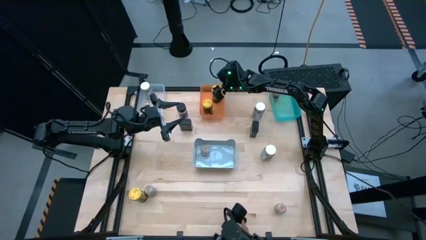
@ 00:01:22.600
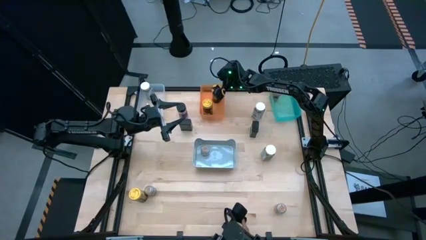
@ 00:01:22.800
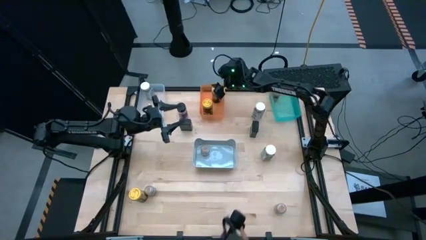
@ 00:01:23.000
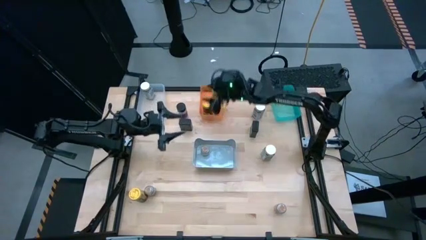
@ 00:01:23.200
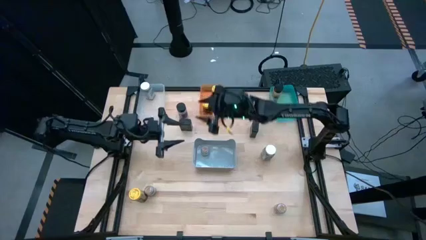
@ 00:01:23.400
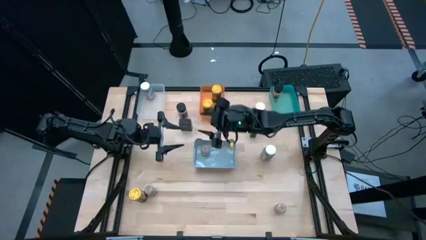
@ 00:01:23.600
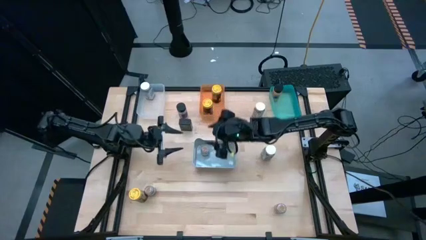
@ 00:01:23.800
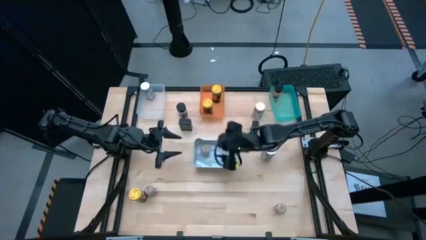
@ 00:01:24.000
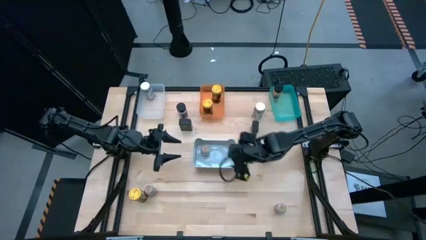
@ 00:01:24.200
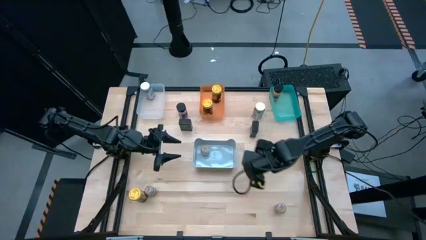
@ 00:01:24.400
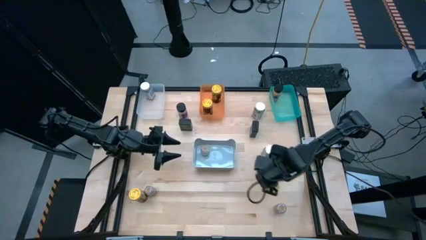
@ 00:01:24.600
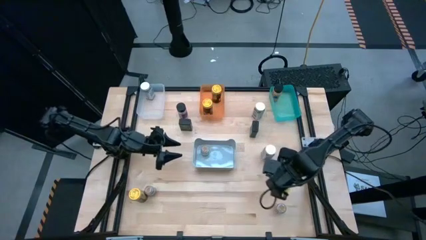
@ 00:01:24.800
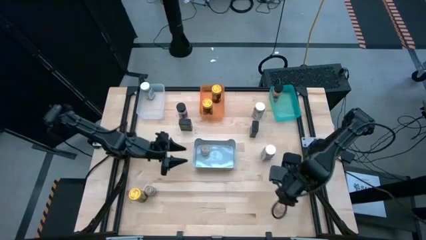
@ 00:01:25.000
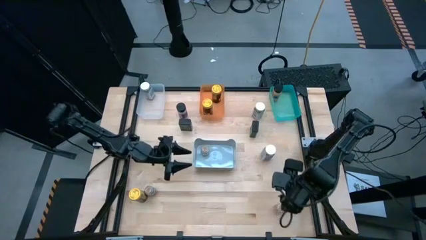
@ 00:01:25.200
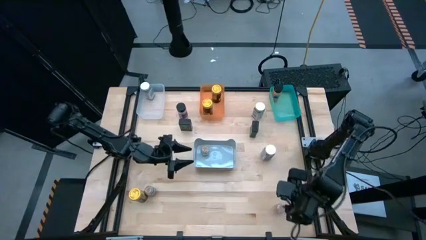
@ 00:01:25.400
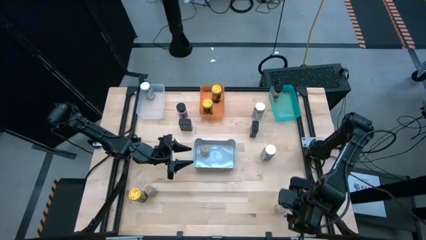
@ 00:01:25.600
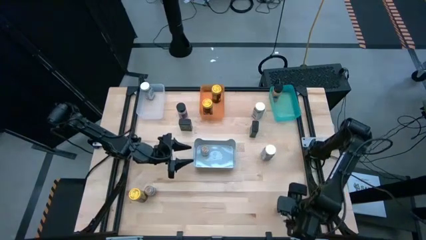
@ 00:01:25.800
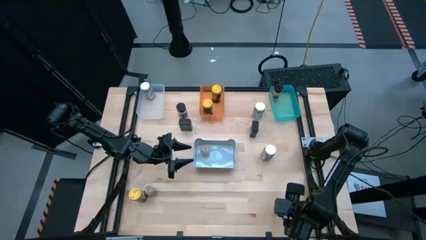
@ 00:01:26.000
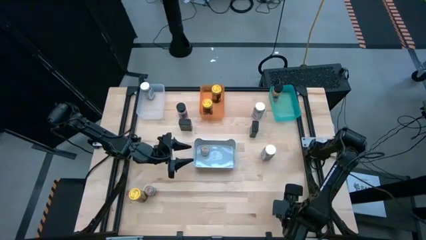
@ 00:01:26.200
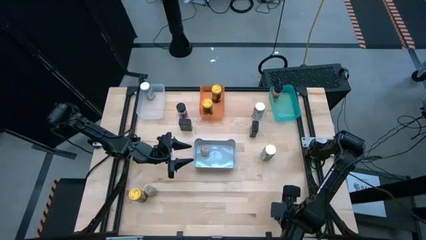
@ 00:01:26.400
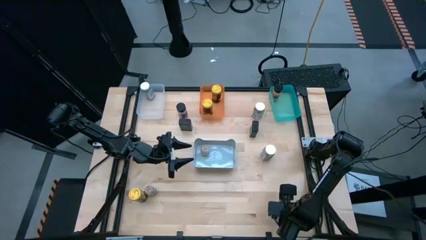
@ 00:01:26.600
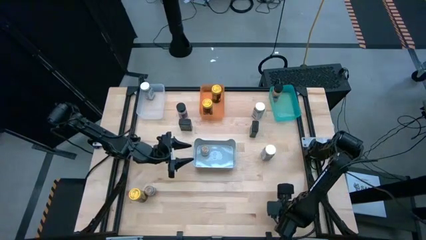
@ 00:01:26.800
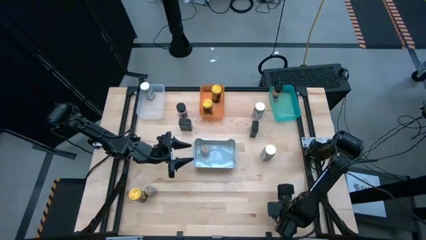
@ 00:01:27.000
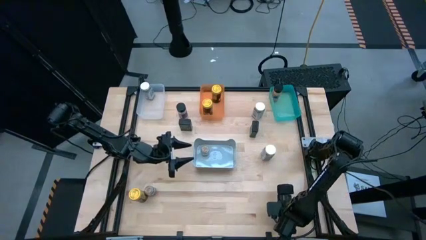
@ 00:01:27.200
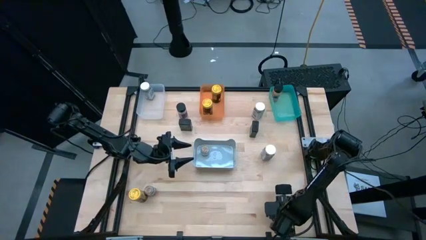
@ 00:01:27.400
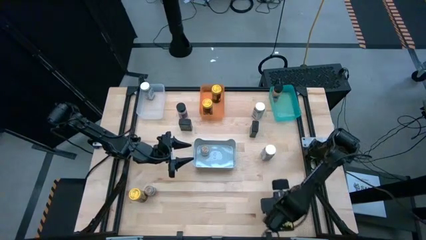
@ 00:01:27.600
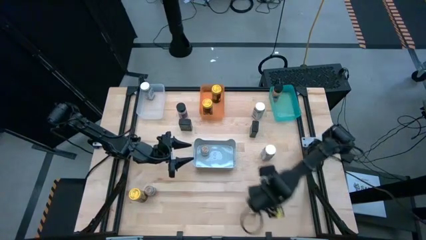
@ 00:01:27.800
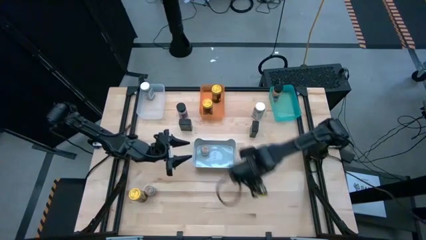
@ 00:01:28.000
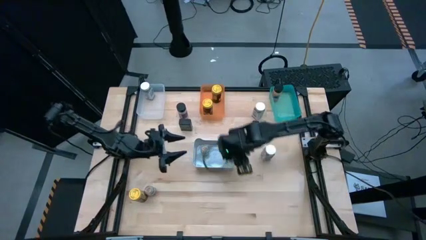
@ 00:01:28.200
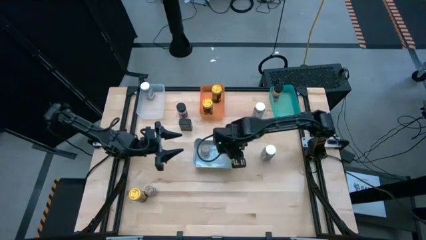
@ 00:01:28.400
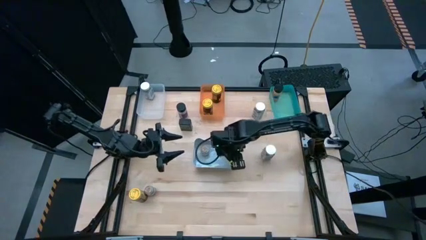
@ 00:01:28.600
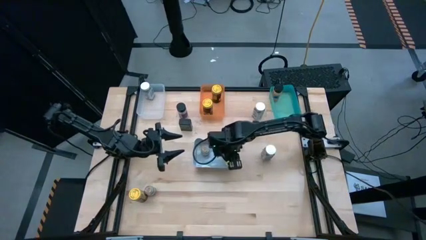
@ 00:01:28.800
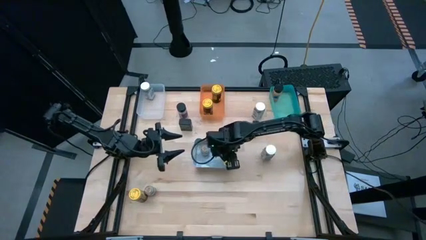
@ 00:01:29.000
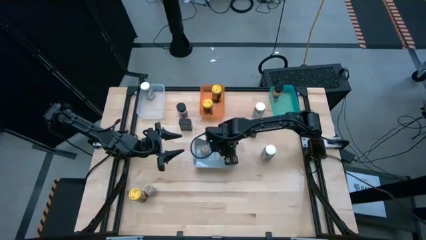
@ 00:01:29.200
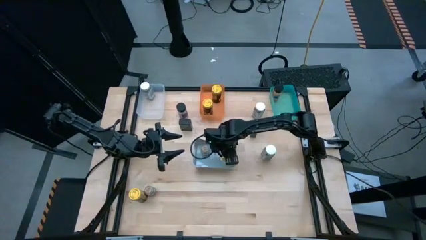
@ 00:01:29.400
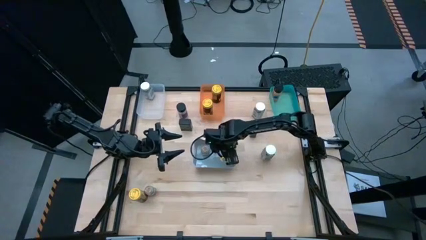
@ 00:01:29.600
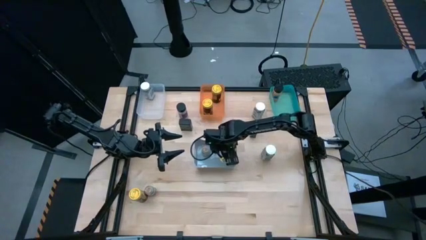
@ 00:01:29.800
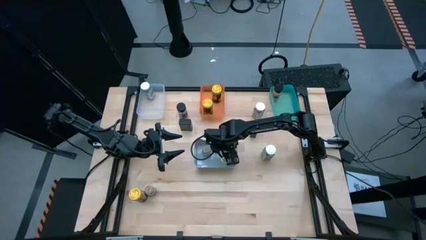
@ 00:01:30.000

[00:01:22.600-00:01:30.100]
Task: Sort spices by type
Put the right brown seasoning bottle into the gray bin
